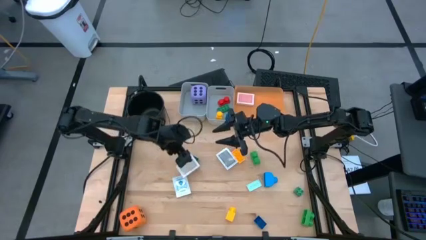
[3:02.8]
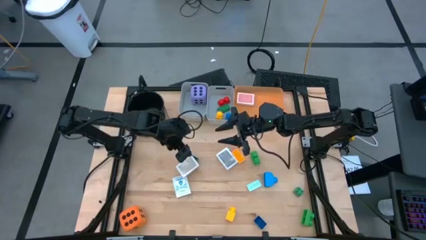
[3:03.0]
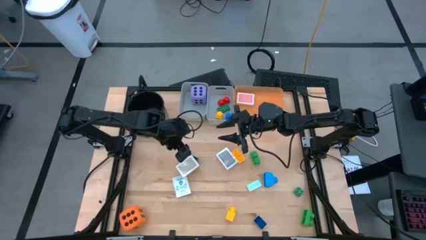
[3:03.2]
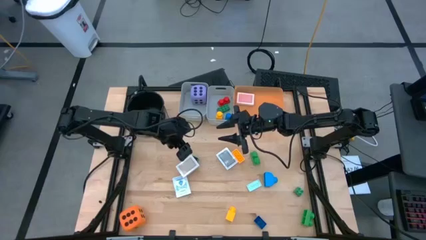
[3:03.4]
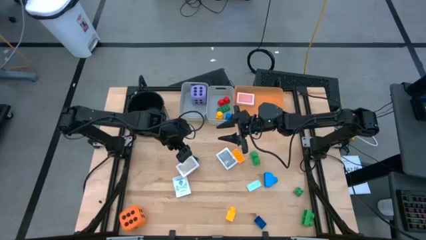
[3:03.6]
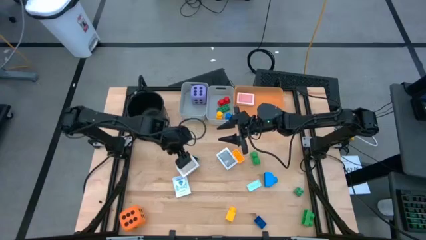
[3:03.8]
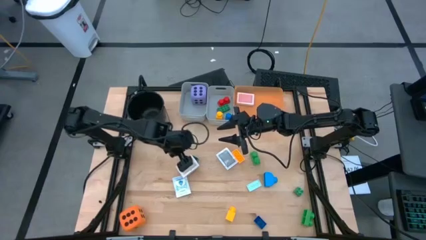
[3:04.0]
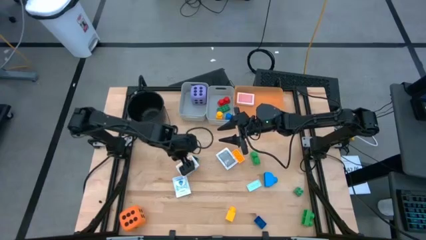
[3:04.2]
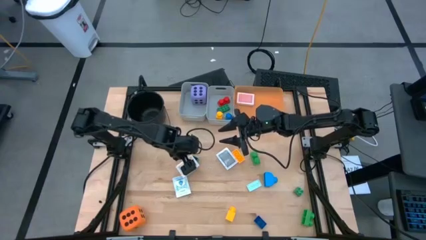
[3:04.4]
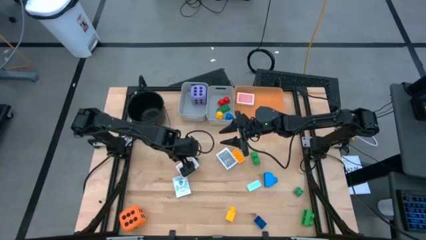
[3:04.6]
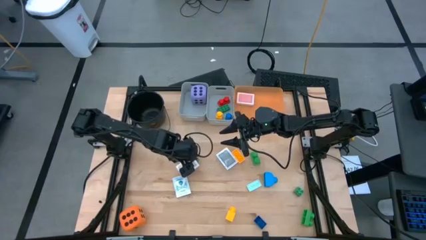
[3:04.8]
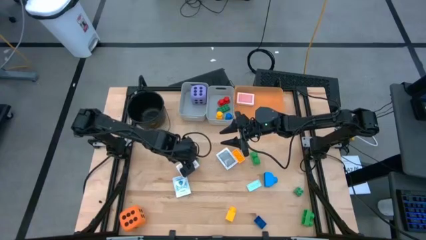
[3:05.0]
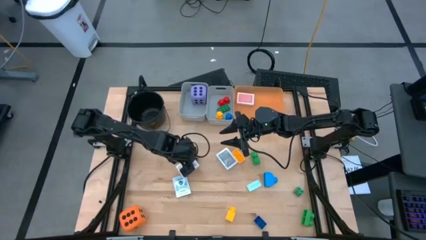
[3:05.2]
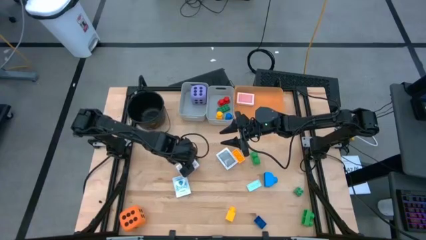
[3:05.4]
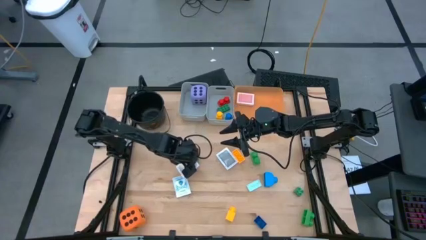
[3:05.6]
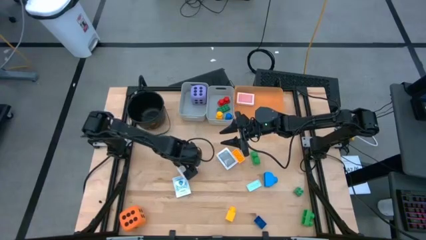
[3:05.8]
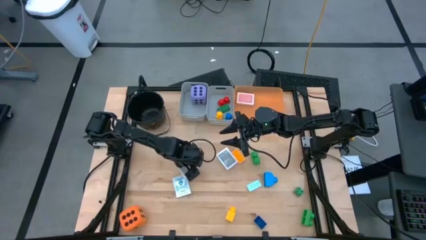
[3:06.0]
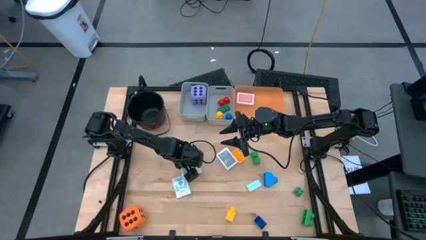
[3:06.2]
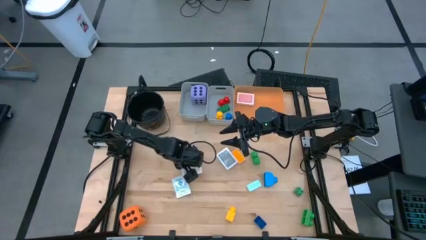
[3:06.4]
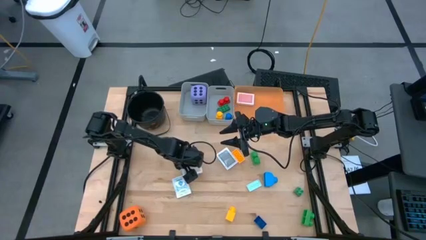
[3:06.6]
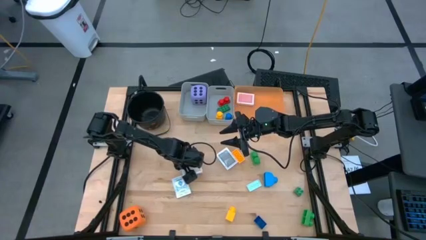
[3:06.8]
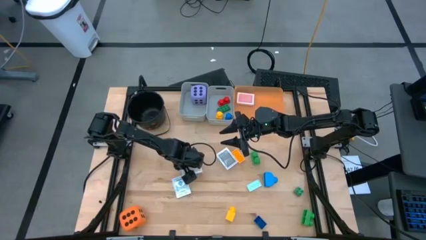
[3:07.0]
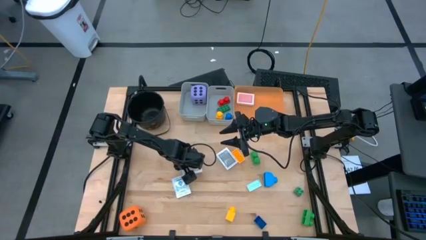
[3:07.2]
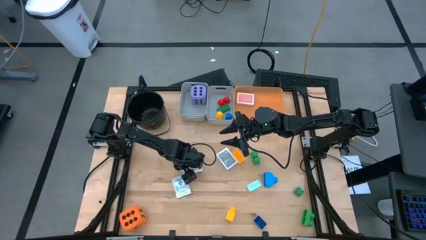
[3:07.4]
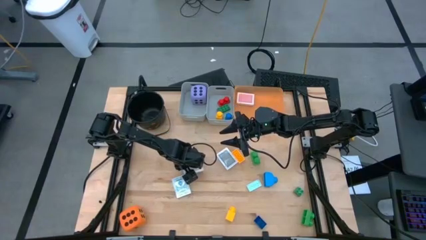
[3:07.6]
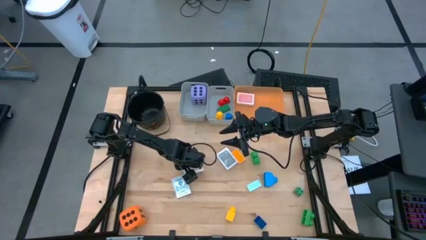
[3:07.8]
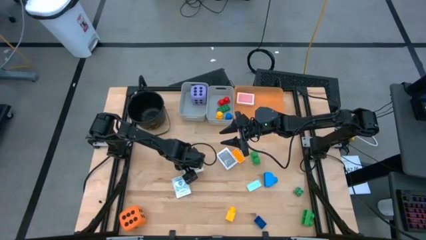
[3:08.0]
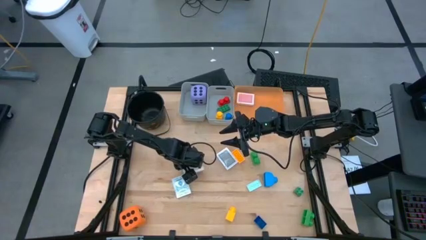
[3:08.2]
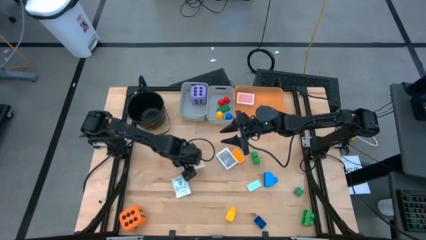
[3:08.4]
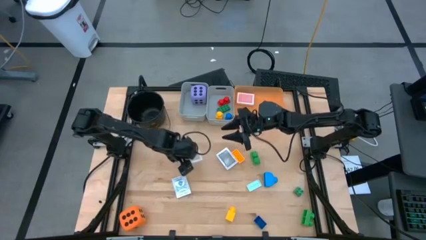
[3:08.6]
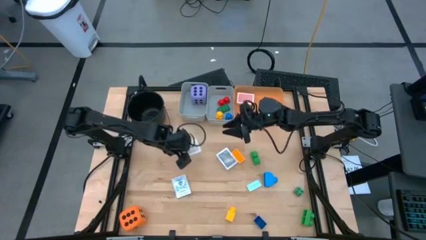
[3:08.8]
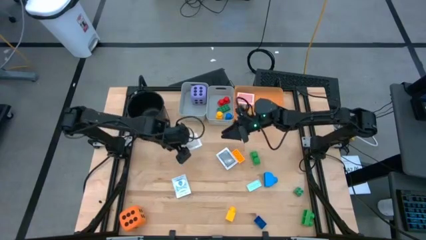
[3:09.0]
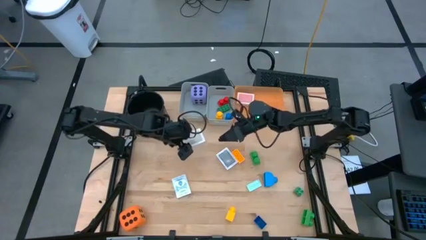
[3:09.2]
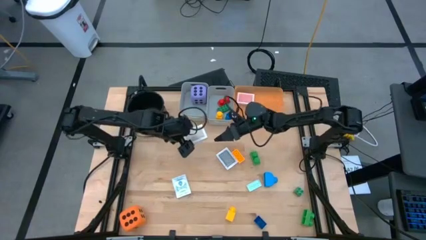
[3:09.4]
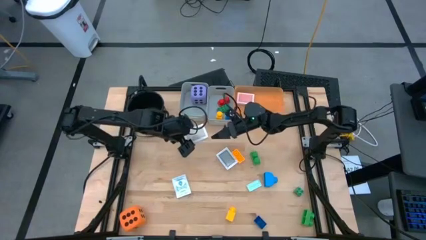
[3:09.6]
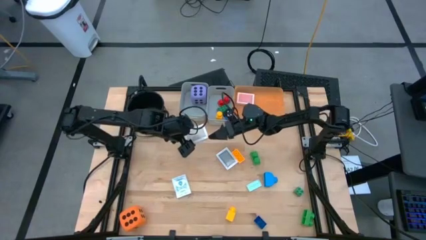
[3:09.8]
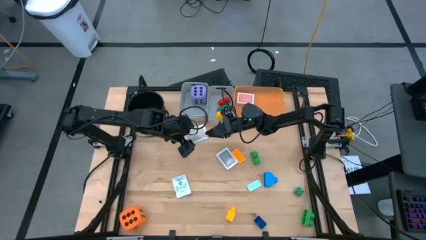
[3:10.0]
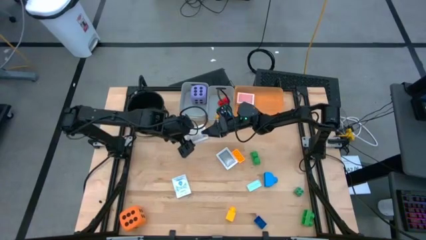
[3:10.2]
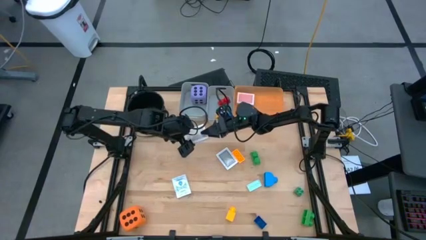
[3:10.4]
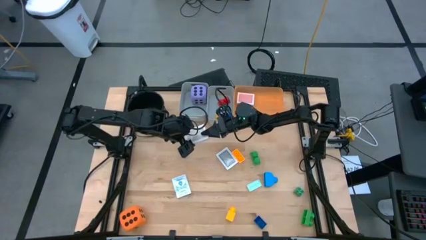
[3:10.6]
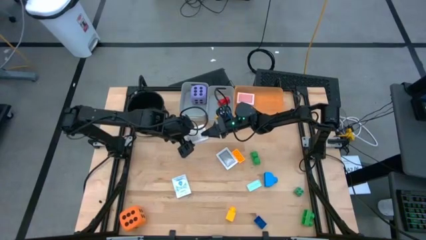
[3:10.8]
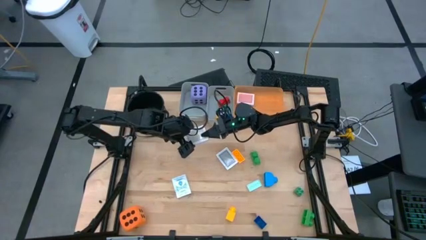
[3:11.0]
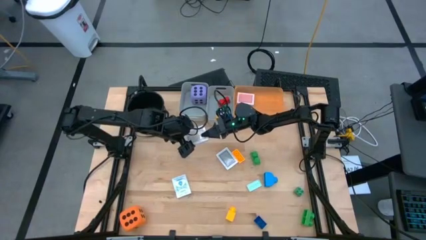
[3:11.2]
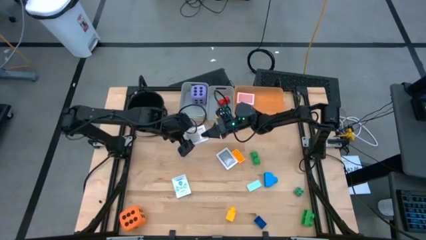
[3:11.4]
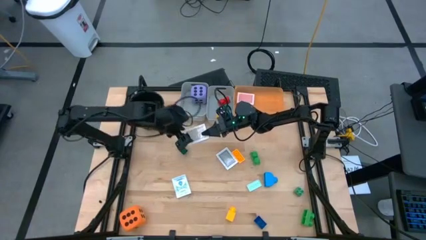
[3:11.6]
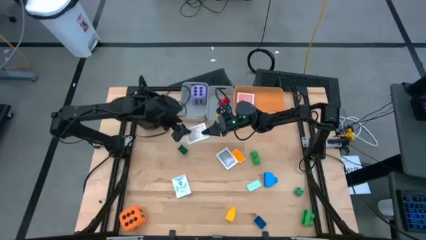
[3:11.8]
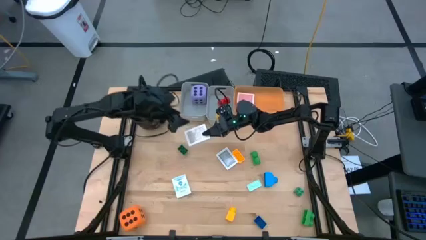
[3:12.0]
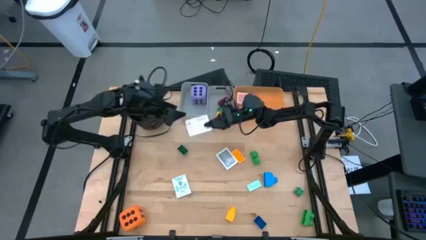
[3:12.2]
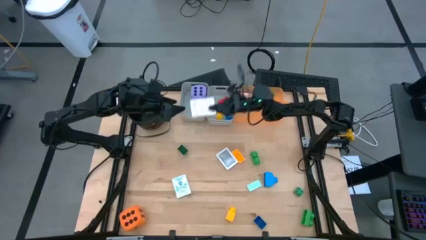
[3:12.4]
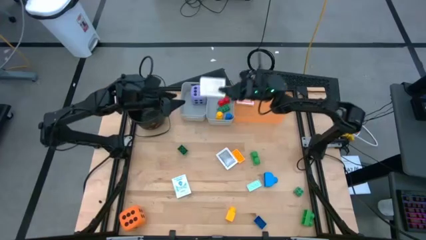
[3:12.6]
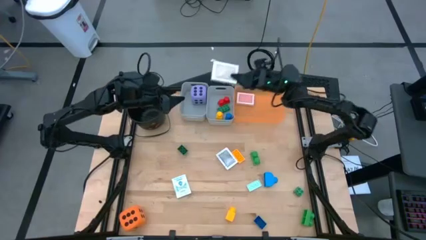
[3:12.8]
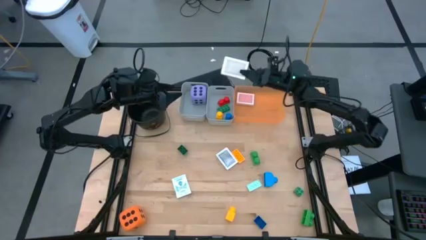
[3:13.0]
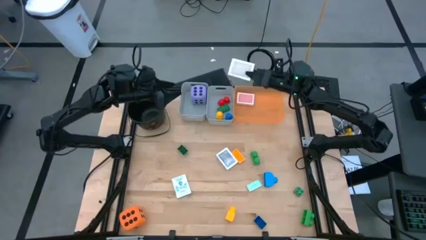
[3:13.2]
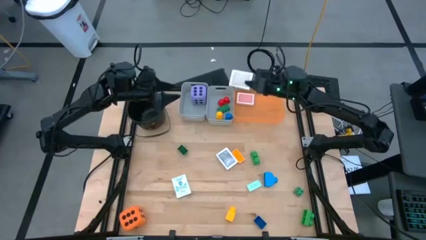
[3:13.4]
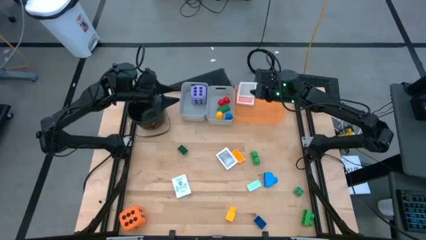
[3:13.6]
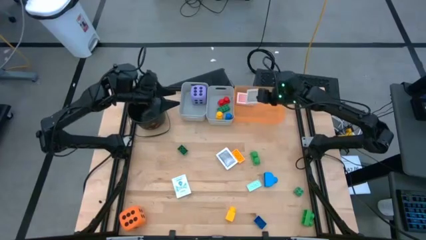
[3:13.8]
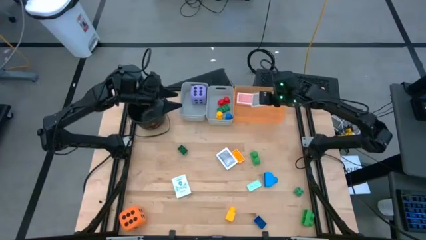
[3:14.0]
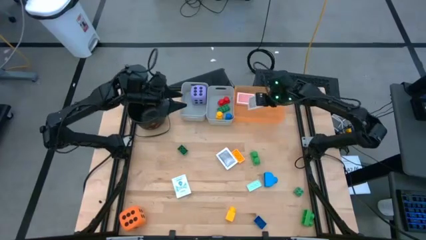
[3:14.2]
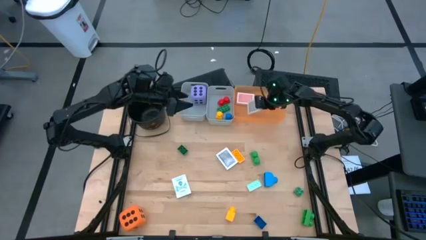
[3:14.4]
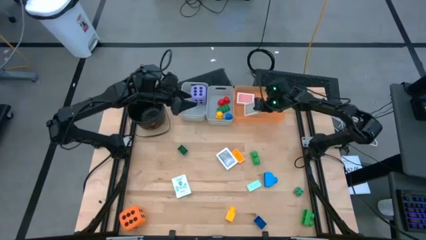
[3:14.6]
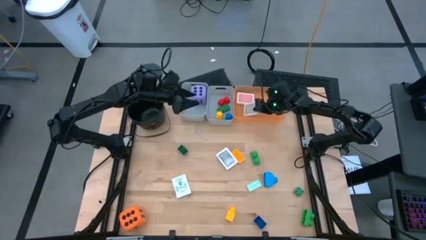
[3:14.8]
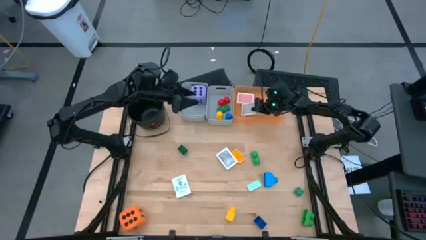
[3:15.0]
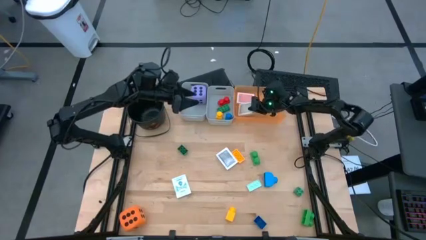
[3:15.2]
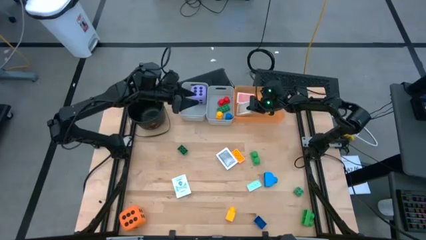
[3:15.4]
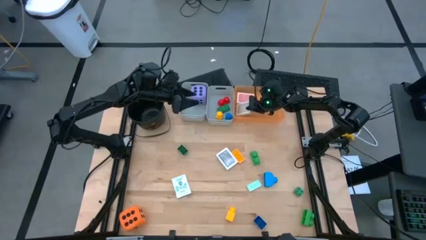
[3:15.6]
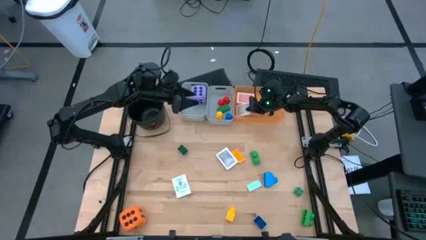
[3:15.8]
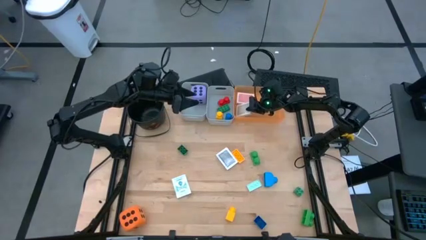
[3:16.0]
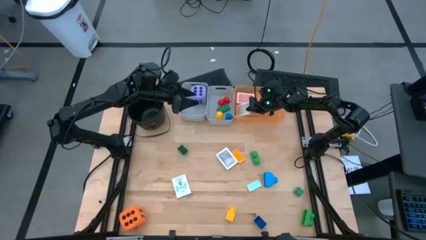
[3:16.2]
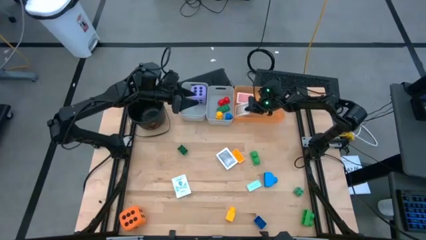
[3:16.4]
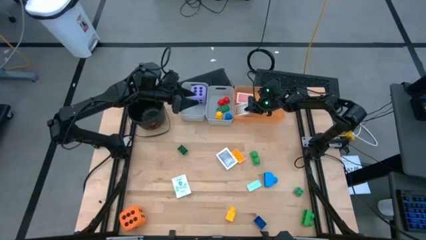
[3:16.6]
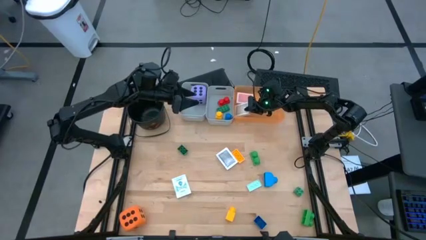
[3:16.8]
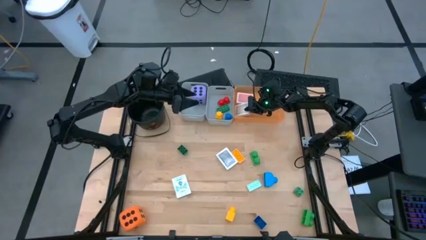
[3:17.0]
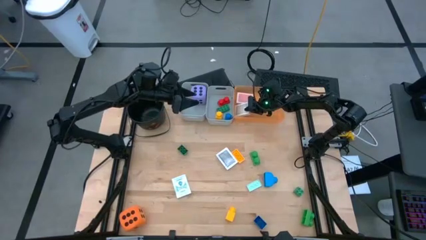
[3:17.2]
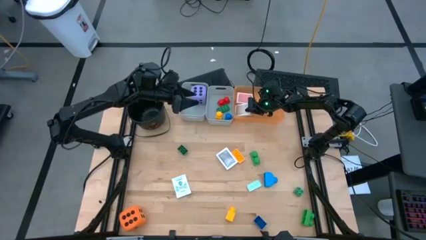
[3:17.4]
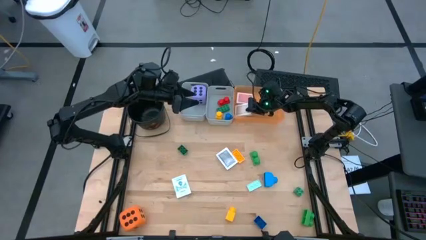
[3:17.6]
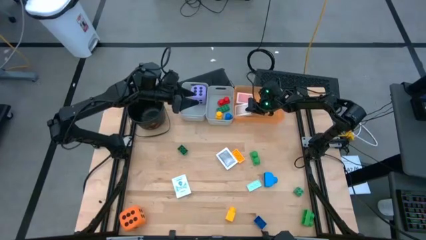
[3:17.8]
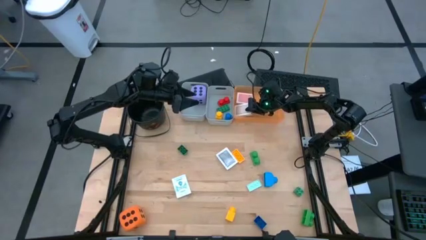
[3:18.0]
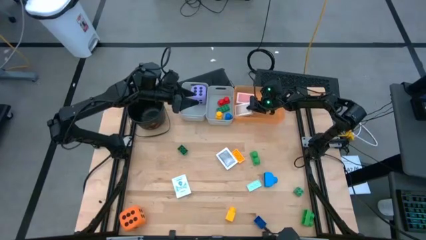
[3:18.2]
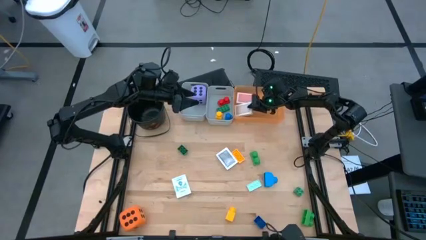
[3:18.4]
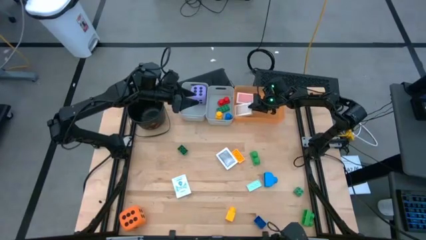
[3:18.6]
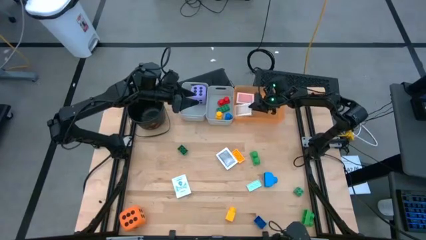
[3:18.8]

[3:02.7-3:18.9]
Task: Pick & Place Toys
Put the brown playing card into the orange bin
